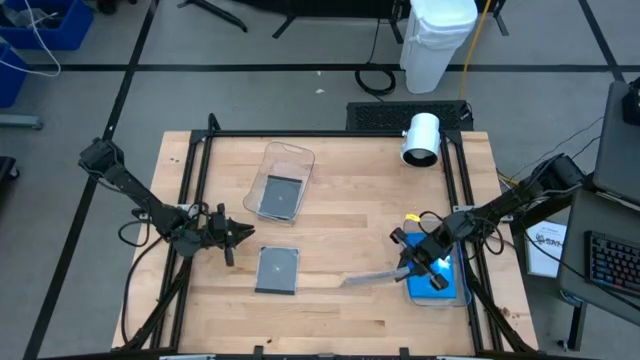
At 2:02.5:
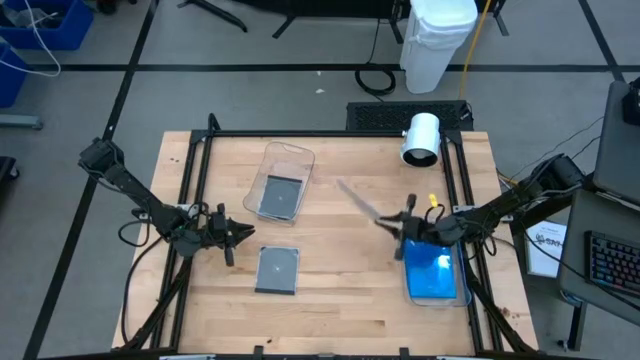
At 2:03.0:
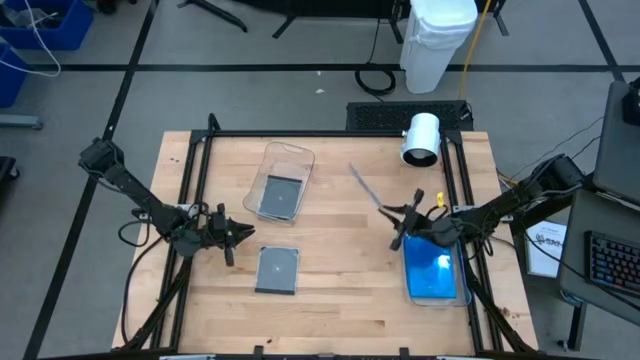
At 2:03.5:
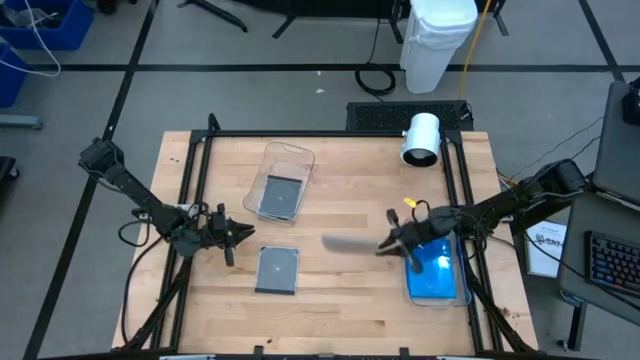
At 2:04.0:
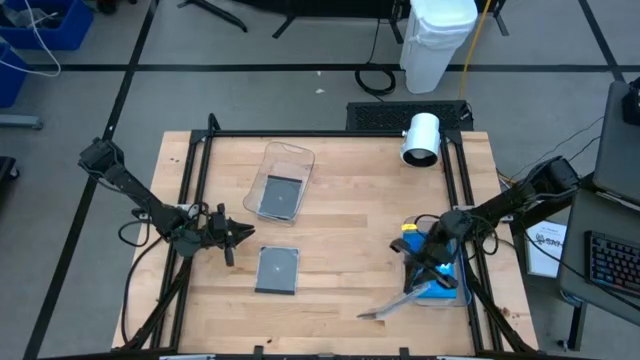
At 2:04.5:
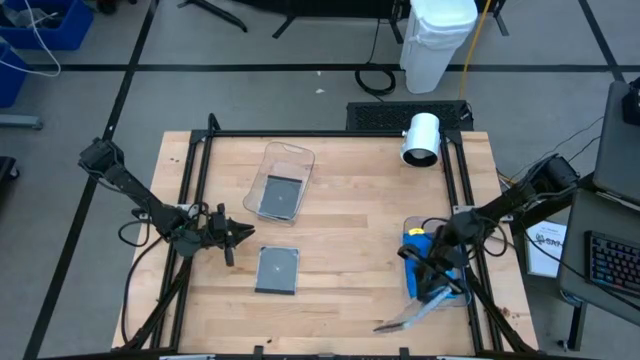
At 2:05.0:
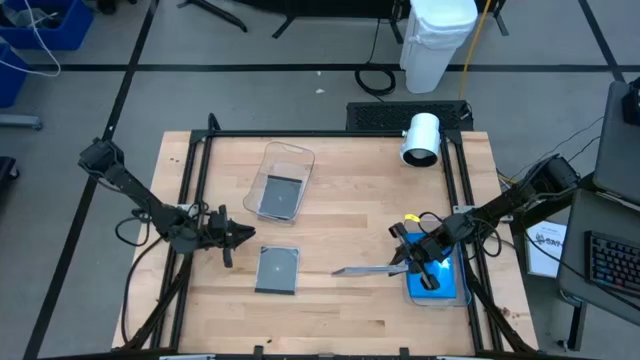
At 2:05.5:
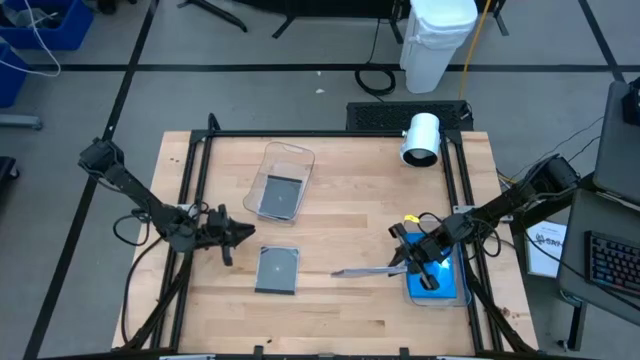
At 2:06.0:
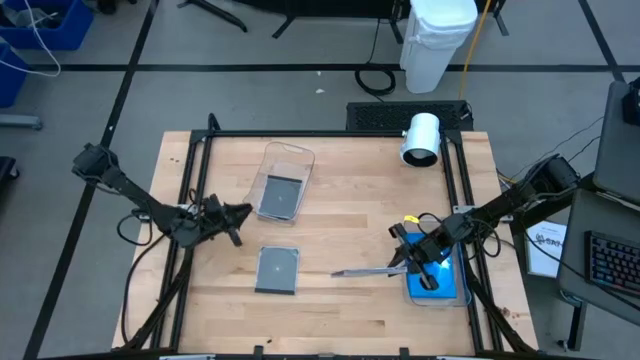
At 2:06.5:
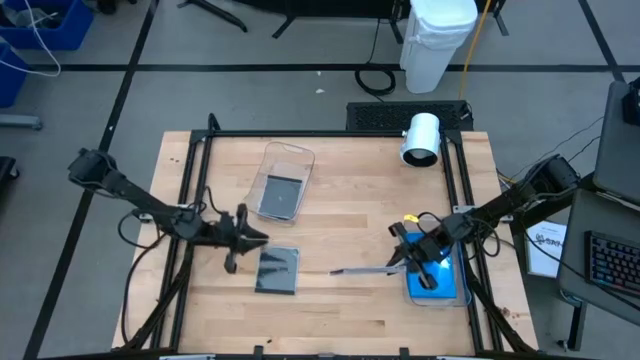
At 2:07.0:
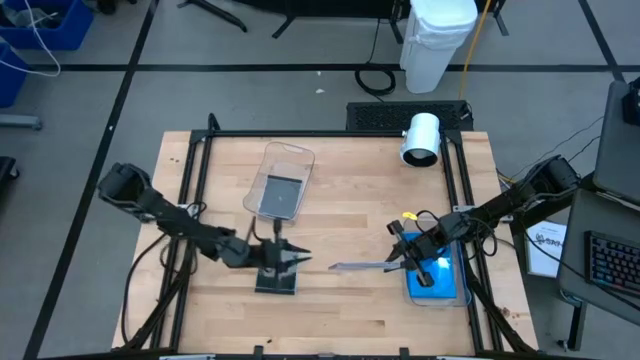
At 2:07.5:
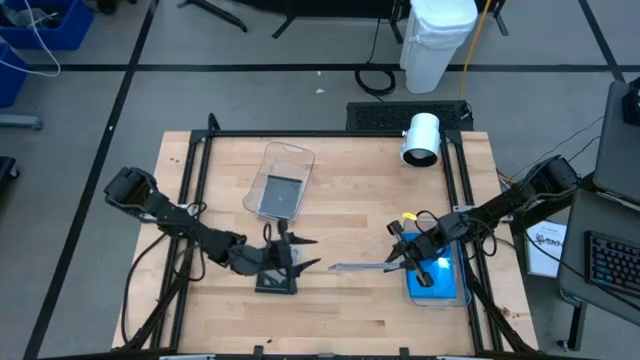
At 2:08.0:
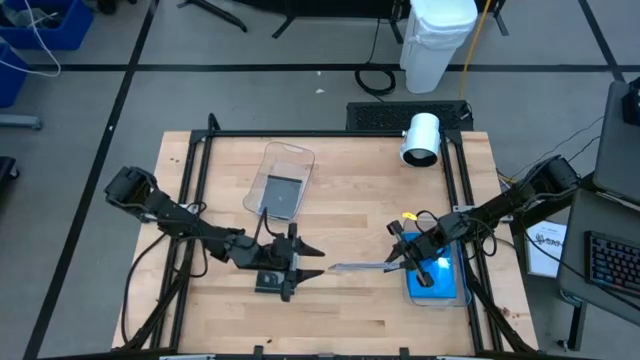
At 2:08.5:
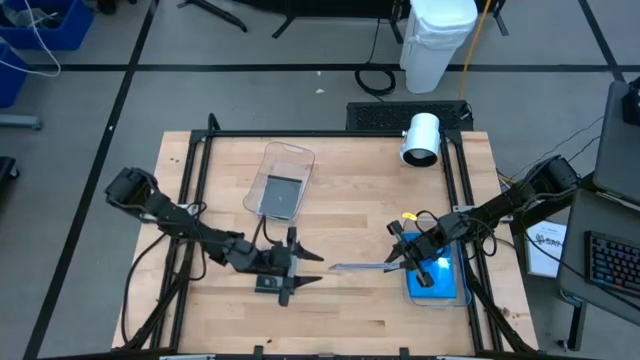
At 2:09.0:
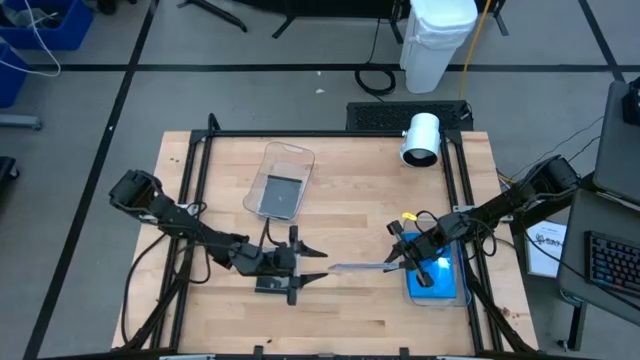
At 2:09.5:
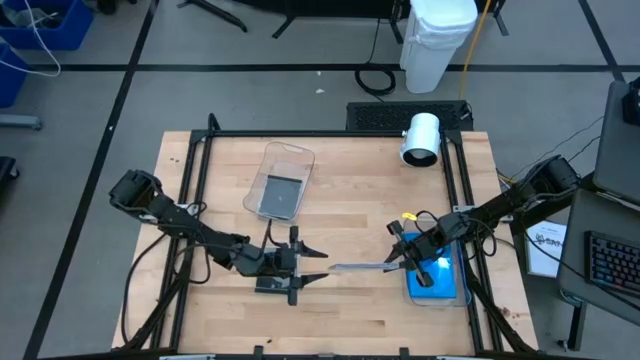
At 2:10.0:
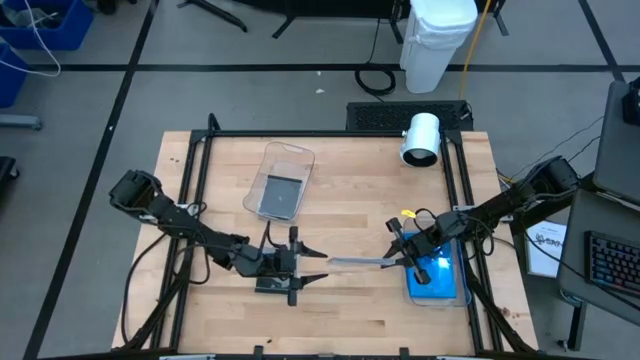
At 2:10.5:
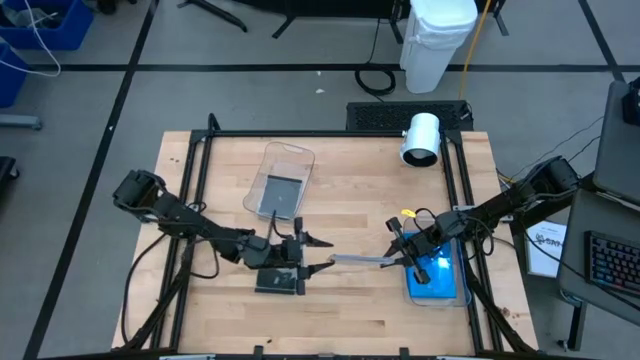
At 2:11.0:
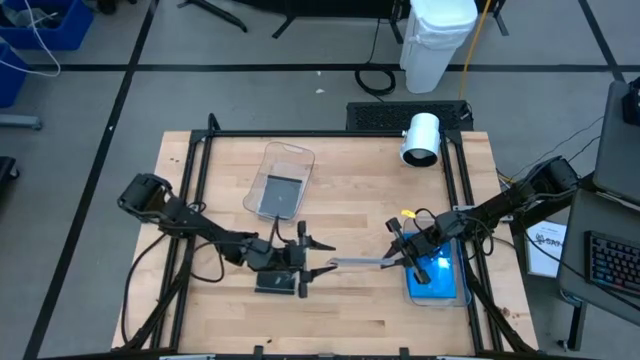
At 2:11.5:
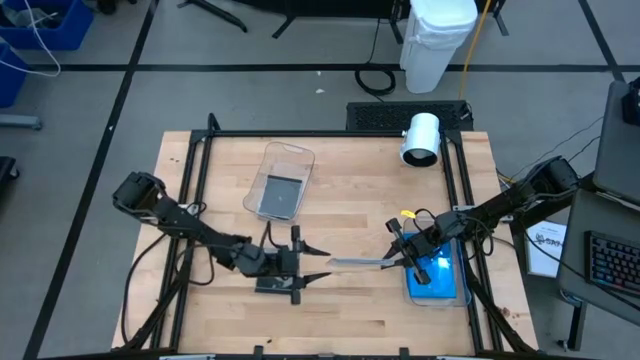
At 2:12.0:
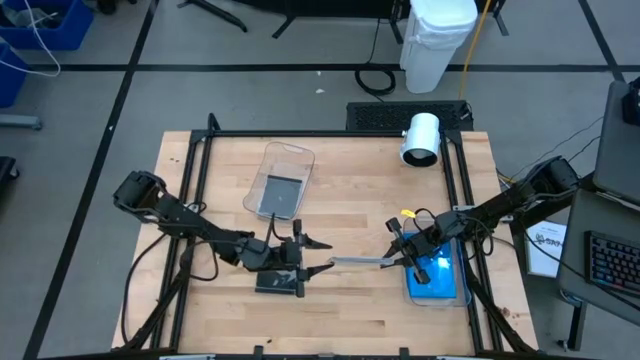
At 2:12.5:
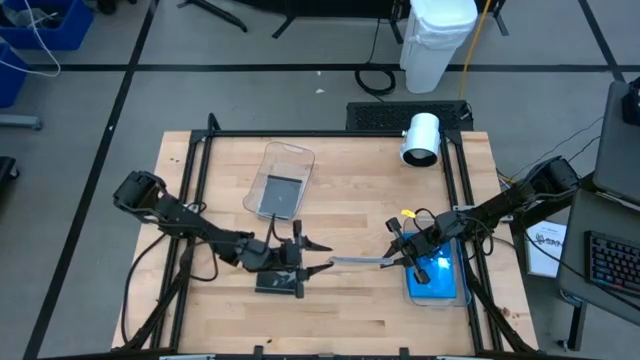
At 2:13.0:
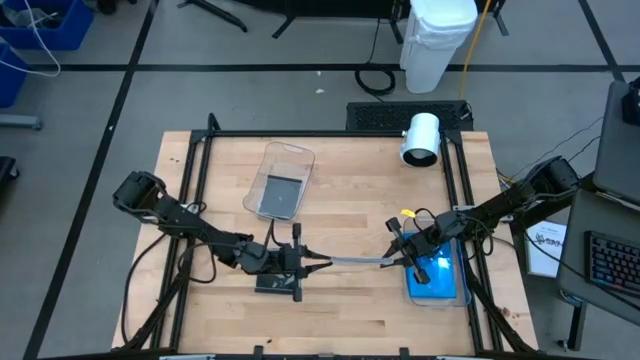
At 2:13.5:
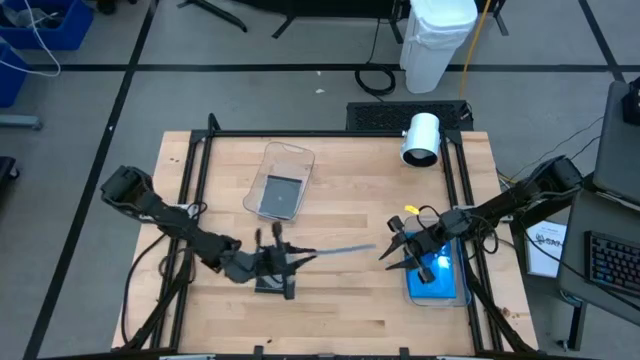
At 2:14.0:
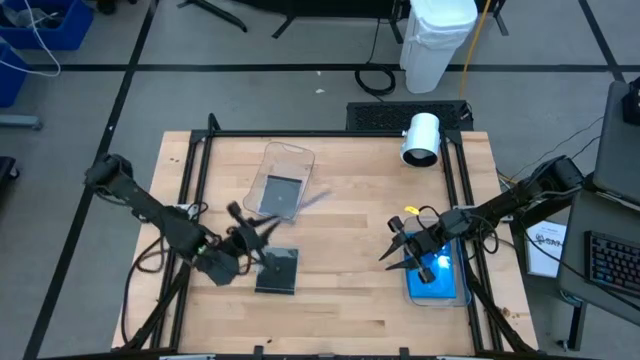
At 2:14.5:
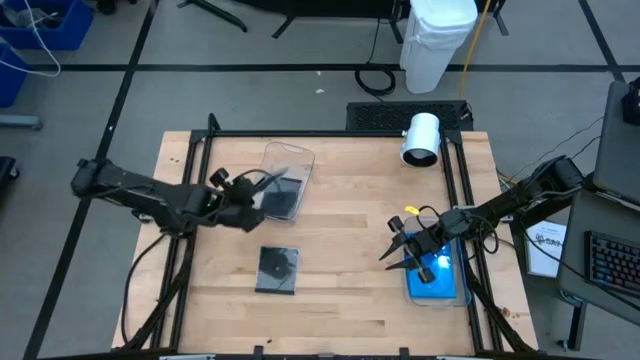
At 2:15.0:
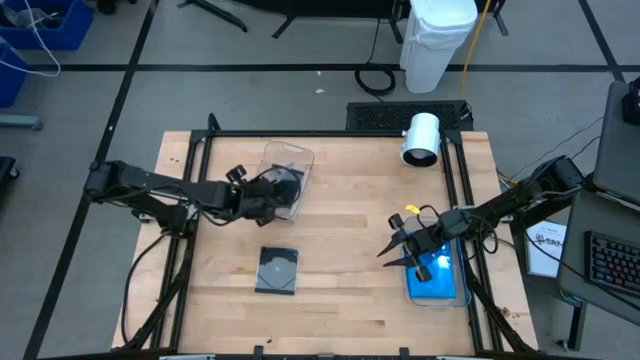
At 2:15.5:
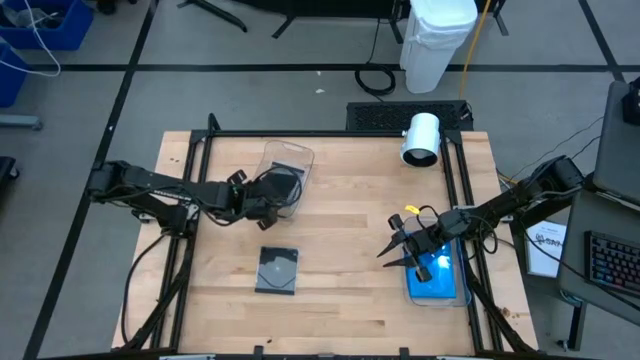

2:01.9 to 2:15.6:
Task: Pick & place jewel cases by type
Put the bottom black disc case into the left transparent bin

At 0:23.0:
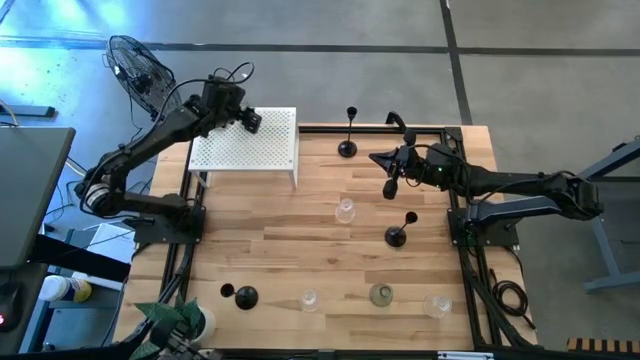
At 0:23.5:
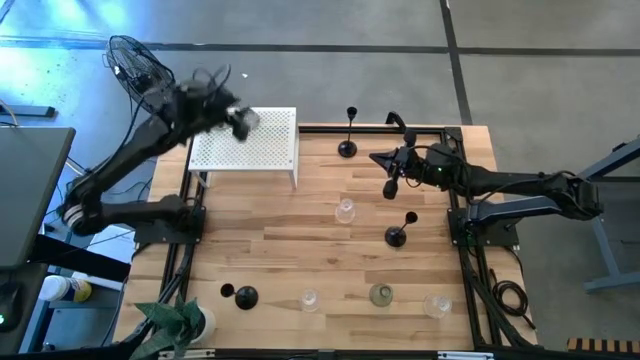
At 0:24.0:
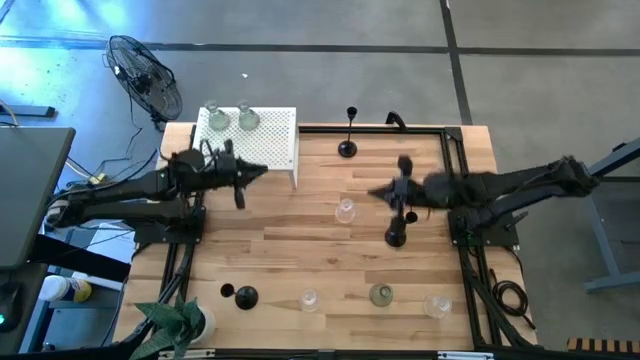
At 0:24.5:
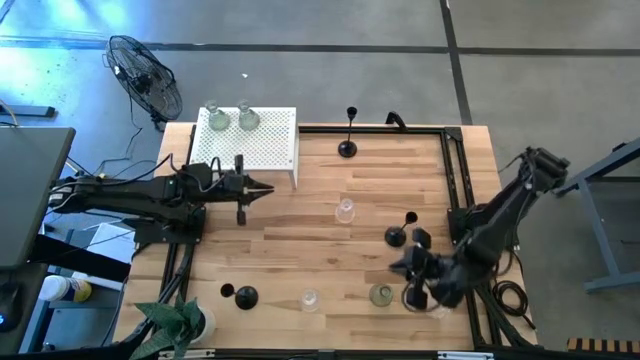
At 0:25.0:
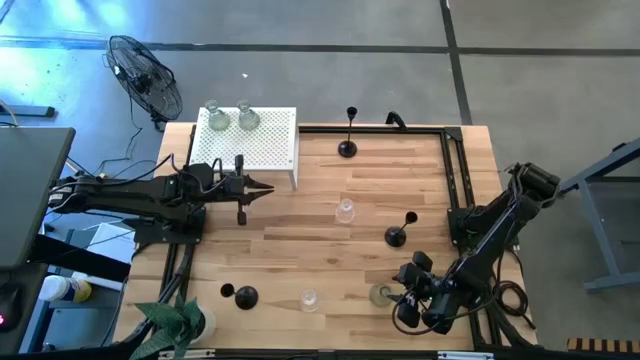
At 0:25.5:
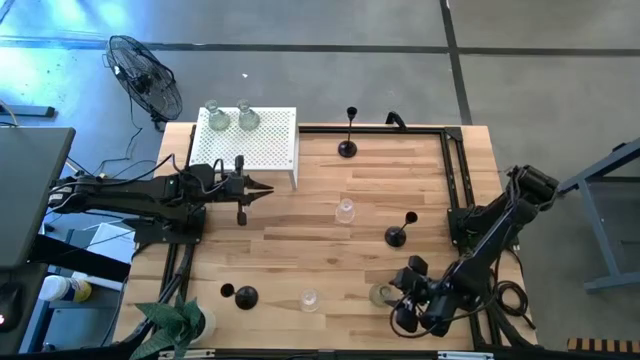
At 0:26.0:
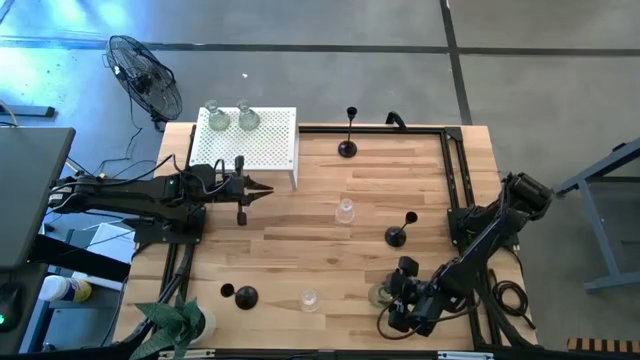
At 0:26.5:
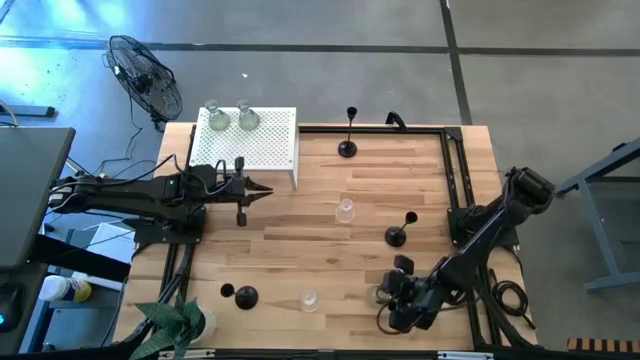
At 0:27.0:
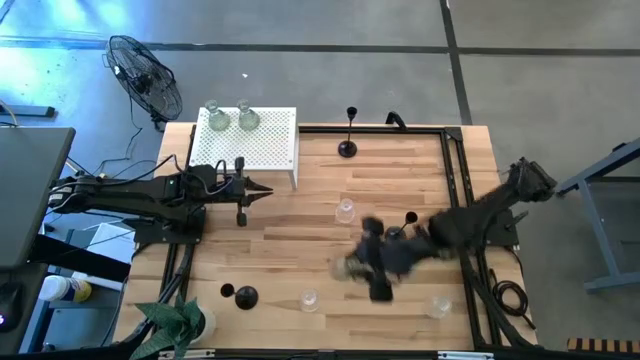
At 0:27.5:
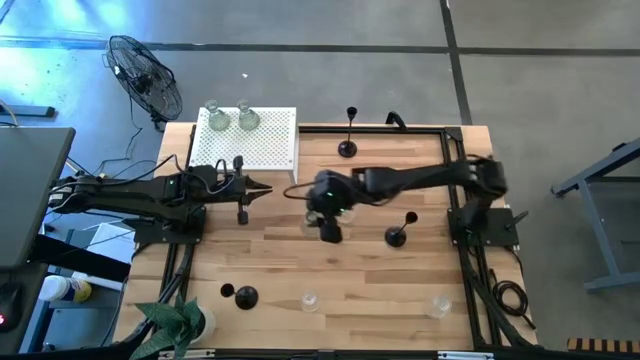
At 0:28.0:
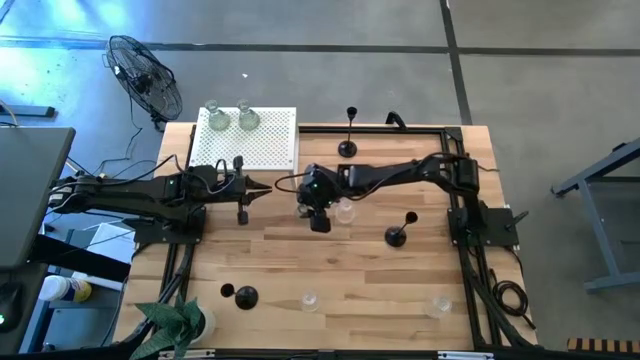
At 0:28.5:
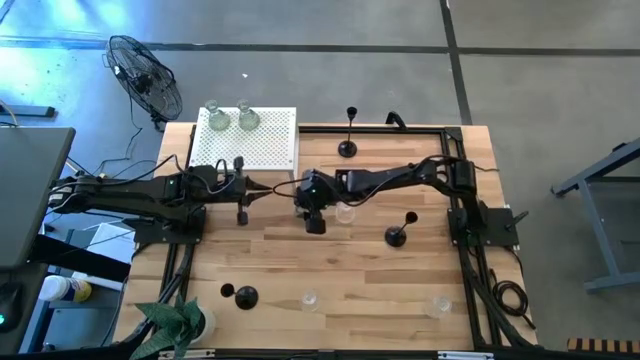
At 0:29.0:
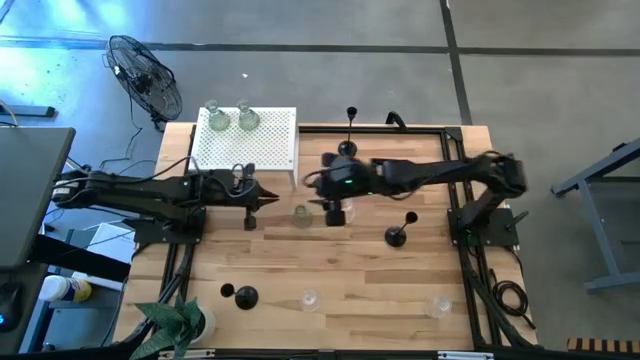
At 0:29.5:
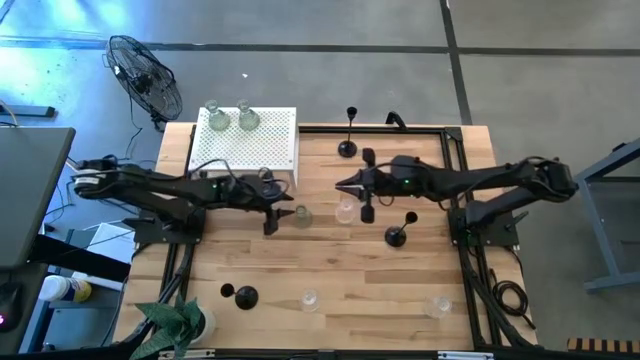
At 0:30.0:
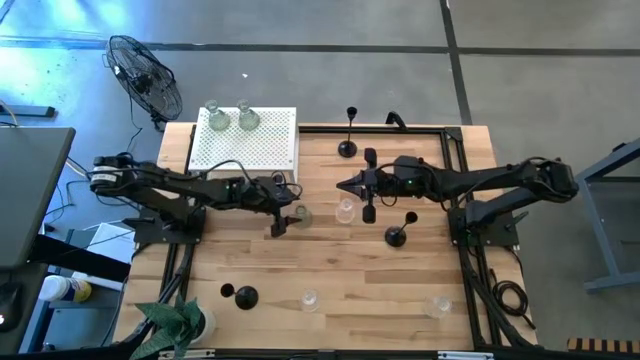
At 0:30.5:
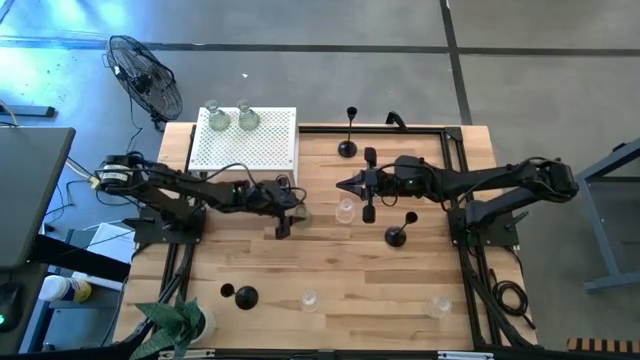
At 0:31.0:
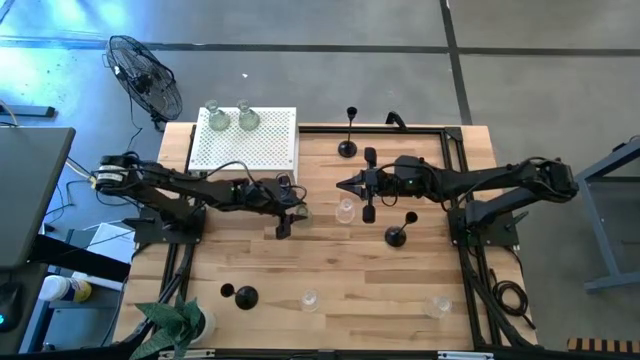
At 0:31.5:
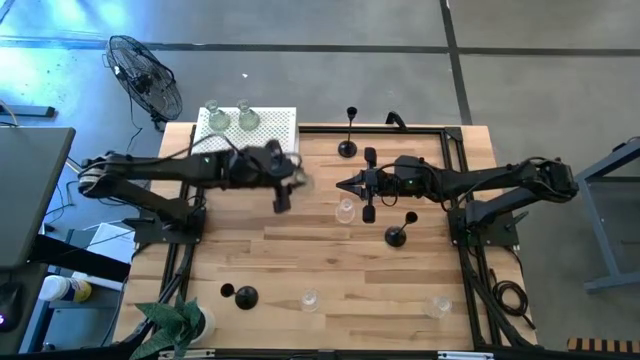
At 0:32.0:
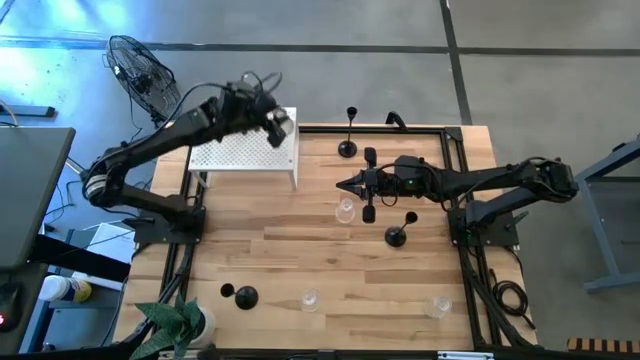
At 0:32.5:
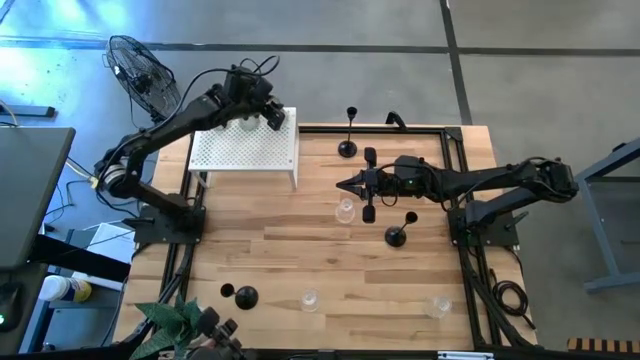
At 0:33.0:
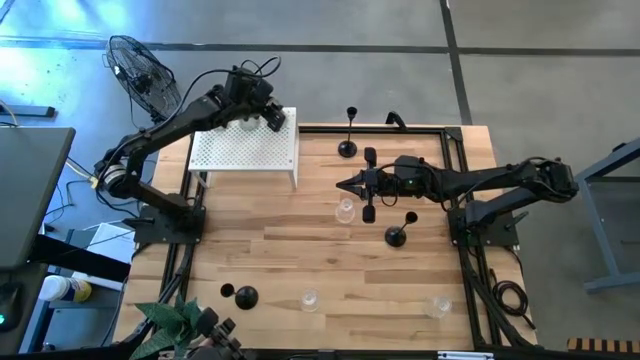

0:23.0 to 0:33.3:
Task: Pick & Place candle stick holders
Put the green candle holder on the shelf aligned with the other green candle holders
